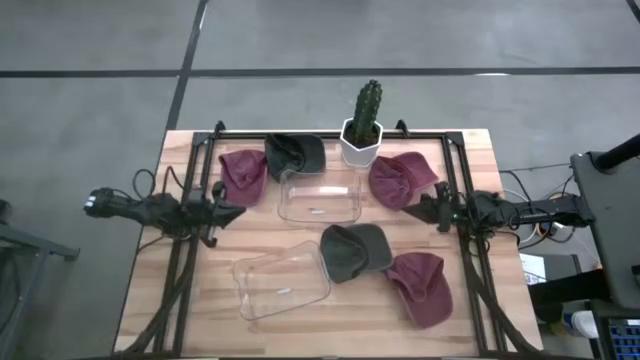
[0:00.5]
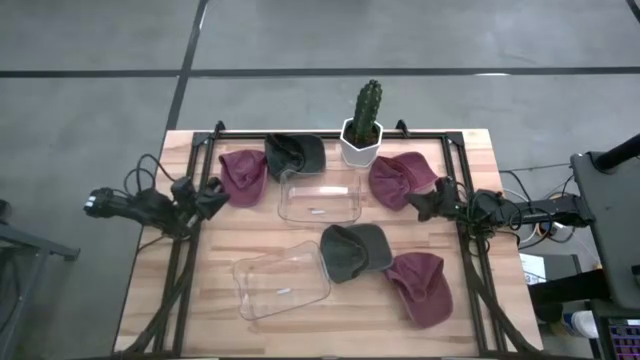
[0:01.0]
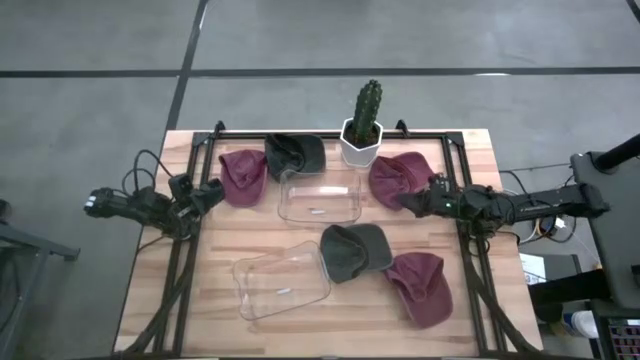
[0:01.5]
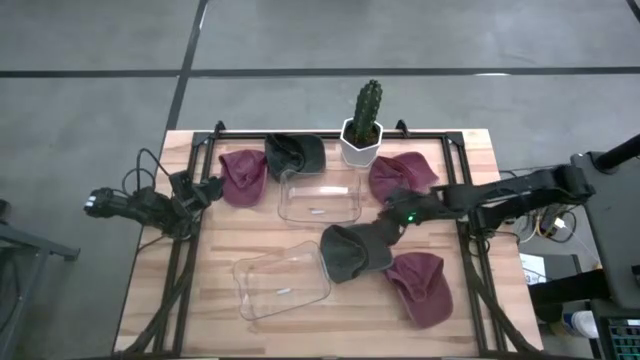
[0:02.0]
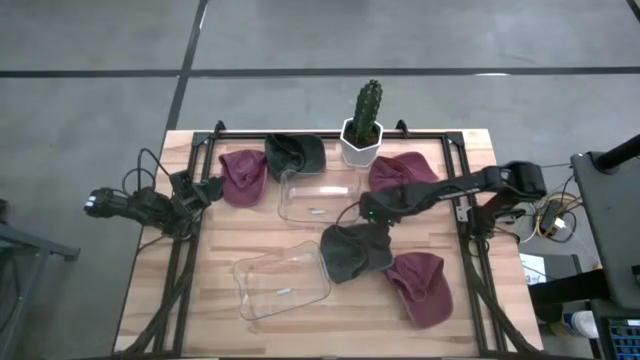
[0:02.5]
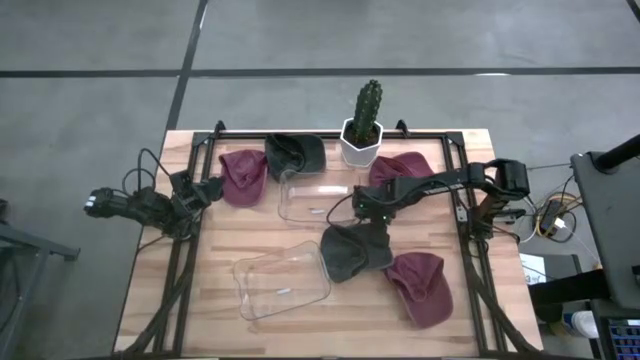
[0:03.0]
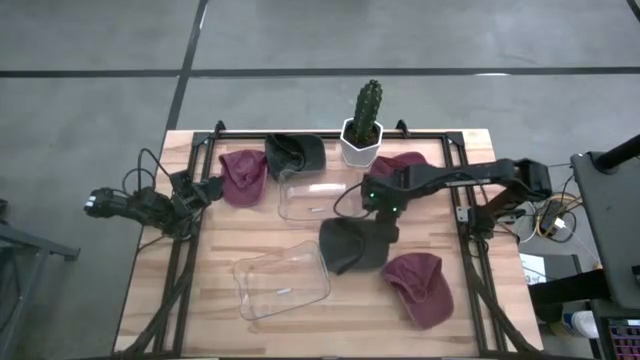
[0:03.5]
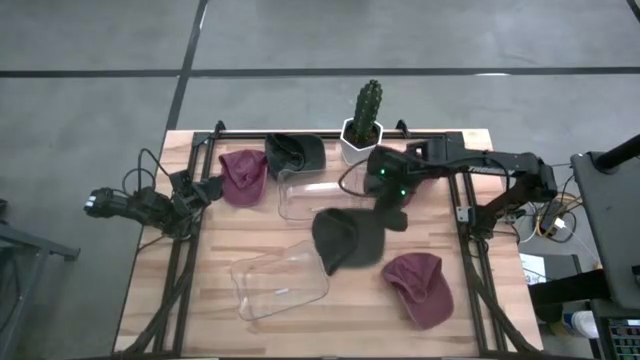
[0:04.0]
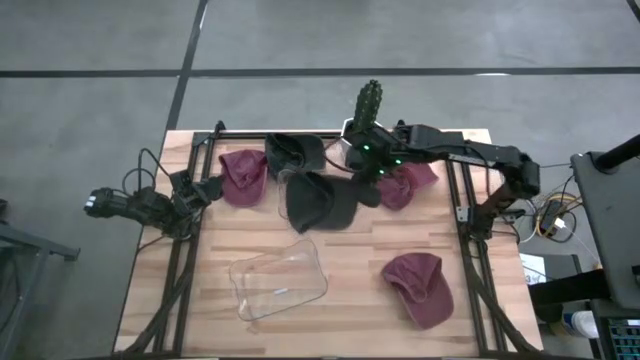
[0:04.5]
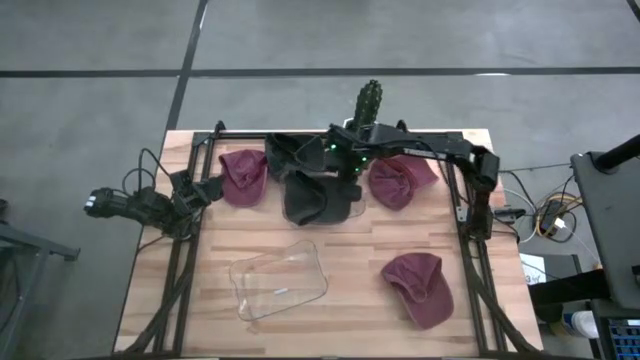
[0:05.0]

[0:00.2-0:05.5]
Task: Pick & Place hat
Put the black cap into the top transparent bin

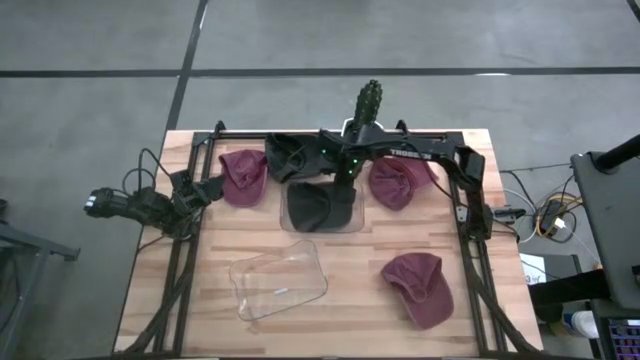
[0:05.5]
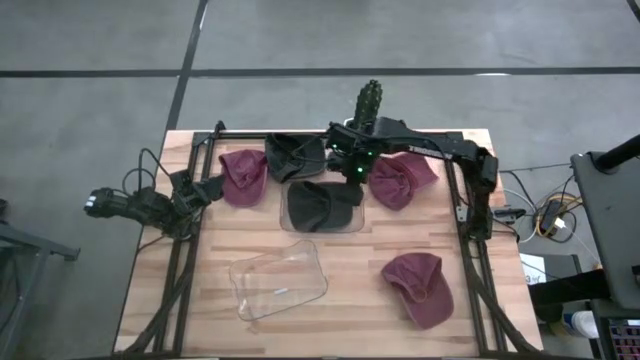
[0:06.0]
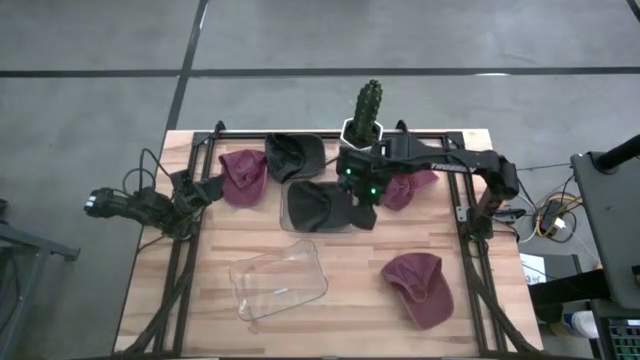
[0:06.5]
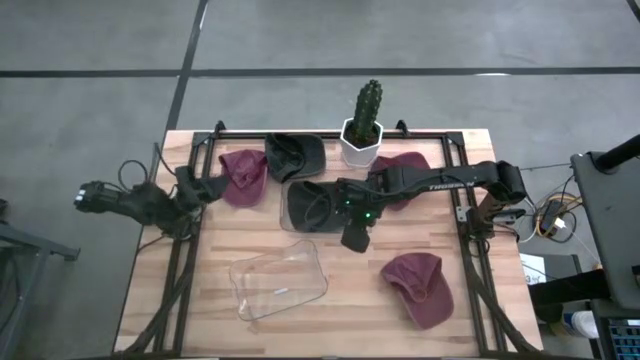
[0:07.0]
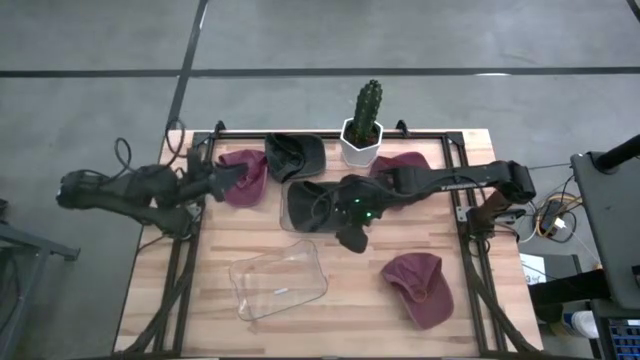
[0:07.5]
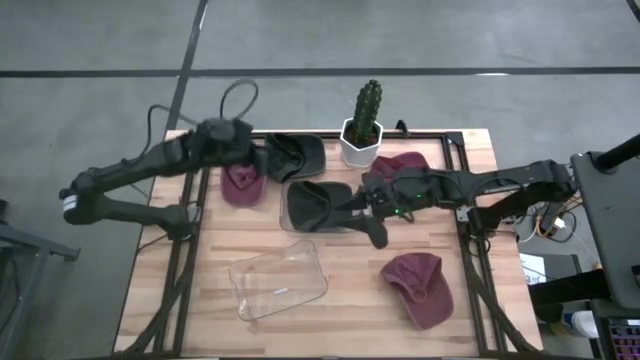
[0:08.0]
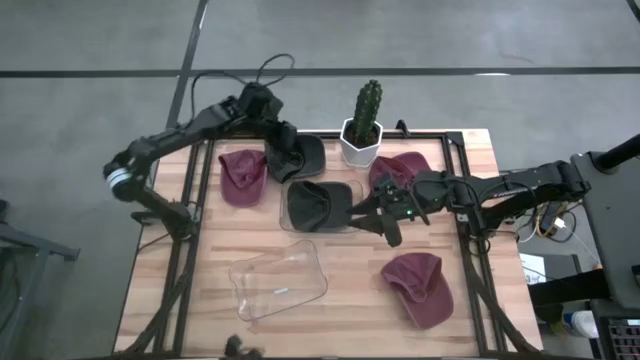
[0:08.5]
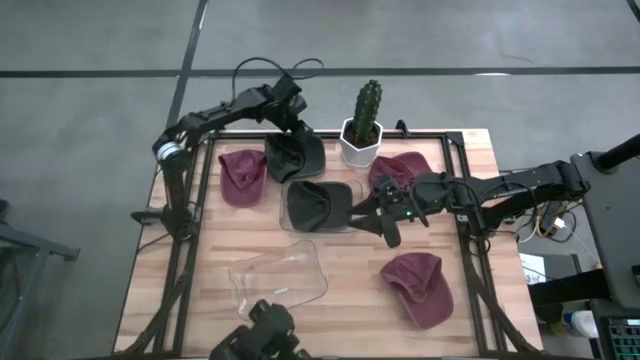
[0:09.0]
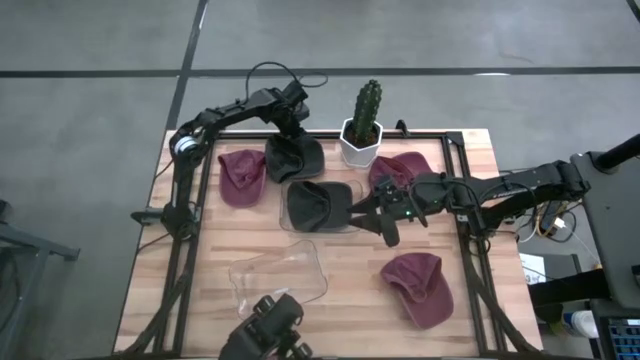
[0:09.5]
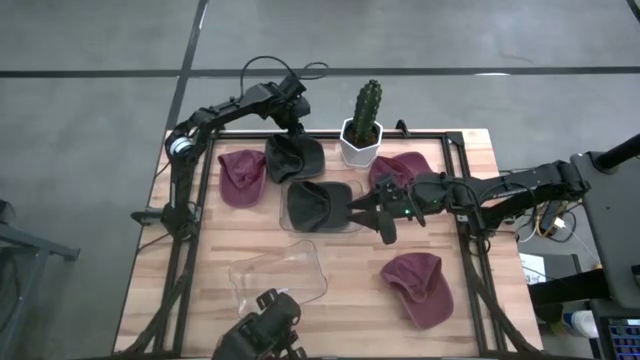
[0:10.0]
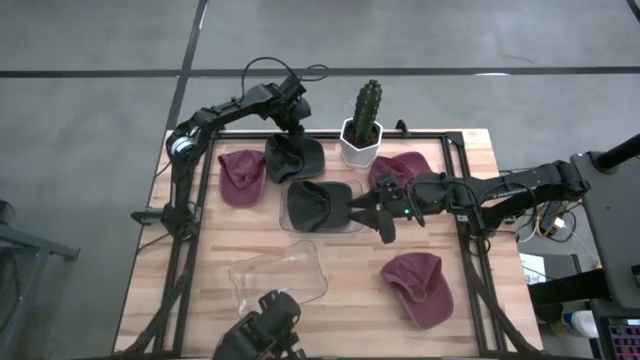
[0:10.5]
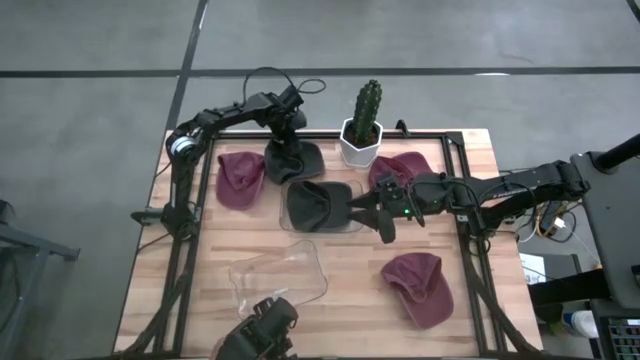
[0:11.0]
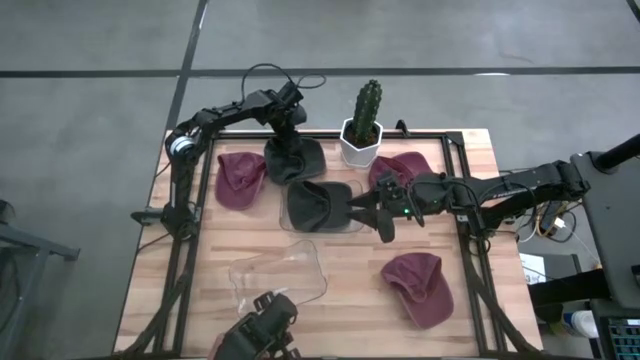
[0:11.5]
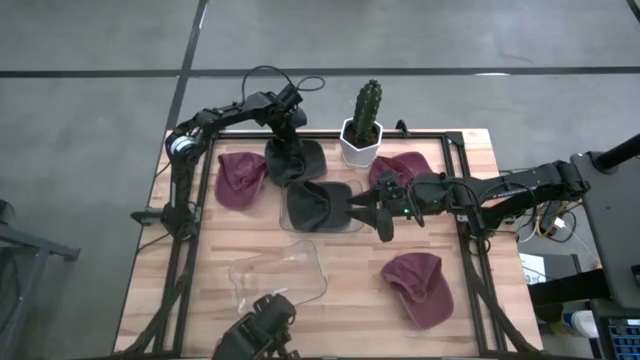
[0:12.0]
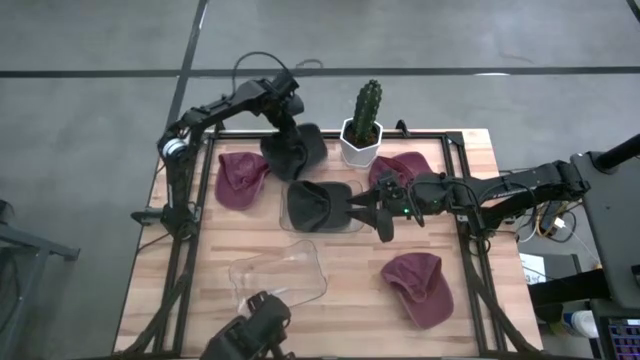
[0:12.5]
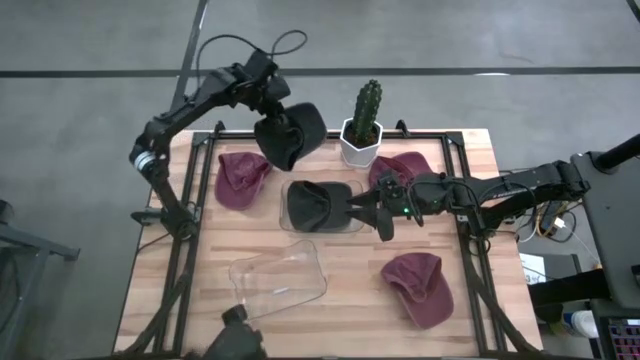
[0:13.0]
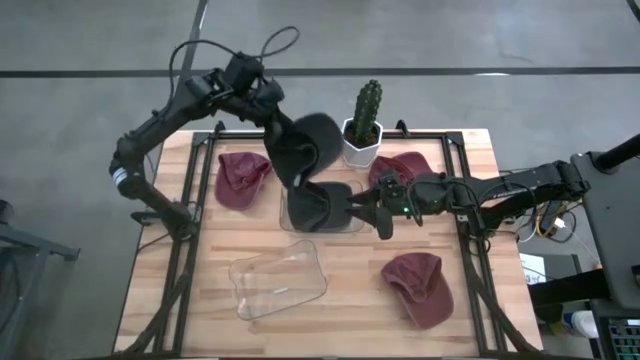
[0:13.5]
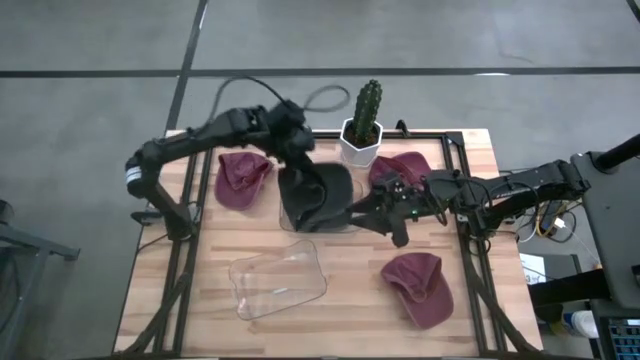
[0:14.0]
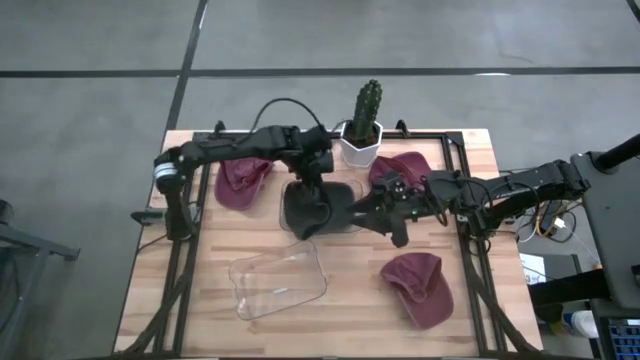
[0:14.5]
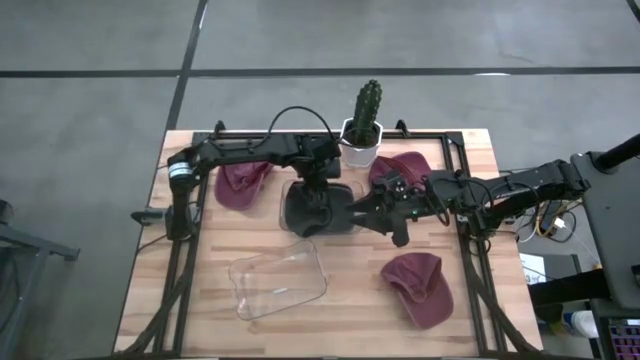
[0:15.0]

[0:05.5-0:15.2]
Put the black cap into the top transparent bin

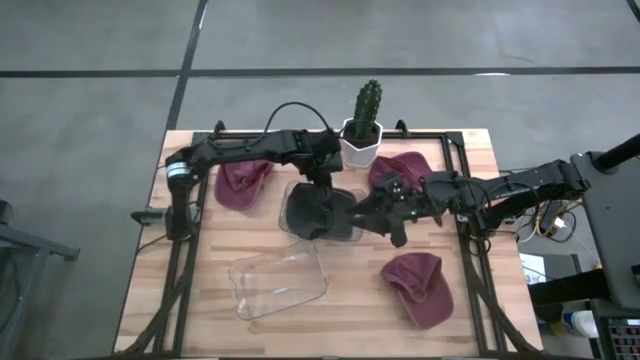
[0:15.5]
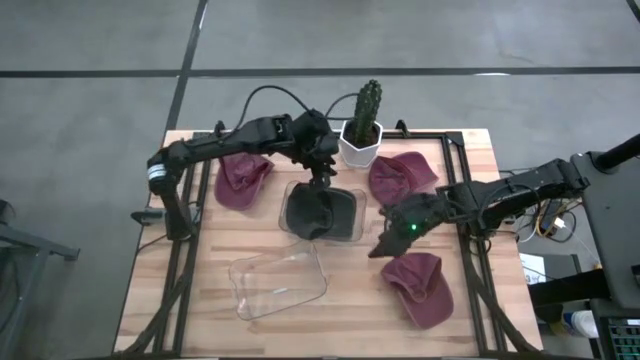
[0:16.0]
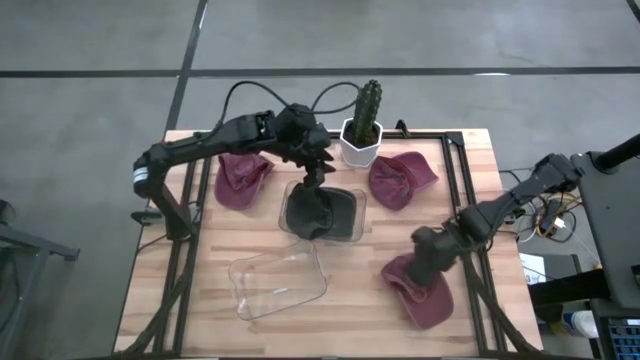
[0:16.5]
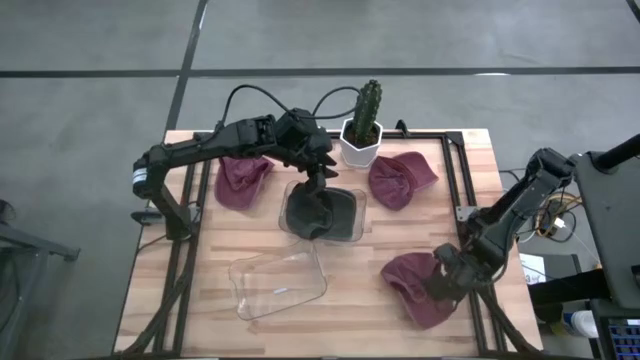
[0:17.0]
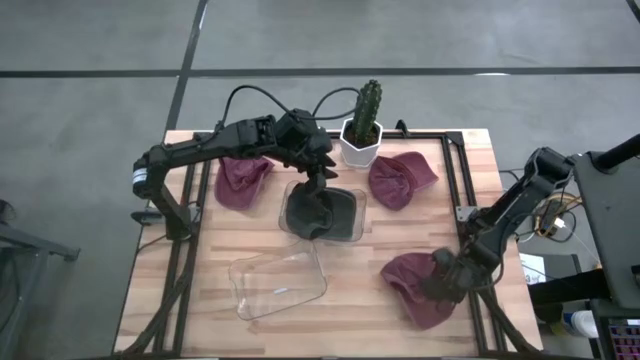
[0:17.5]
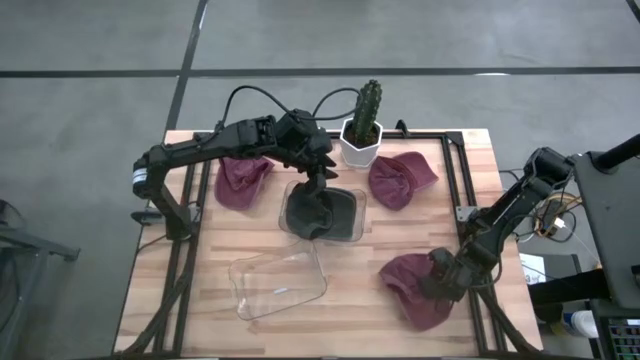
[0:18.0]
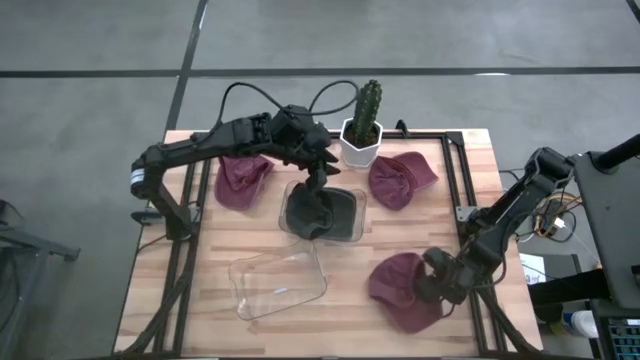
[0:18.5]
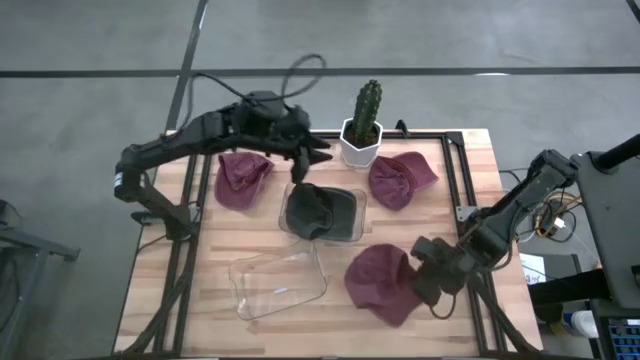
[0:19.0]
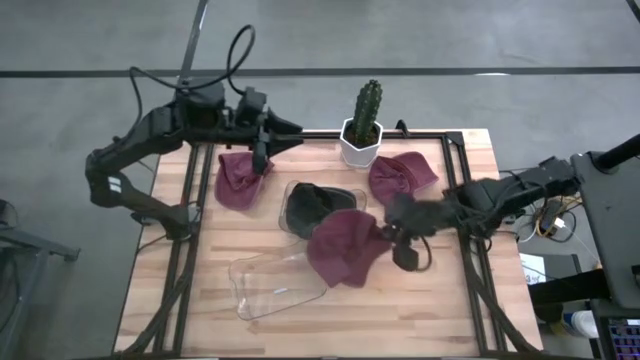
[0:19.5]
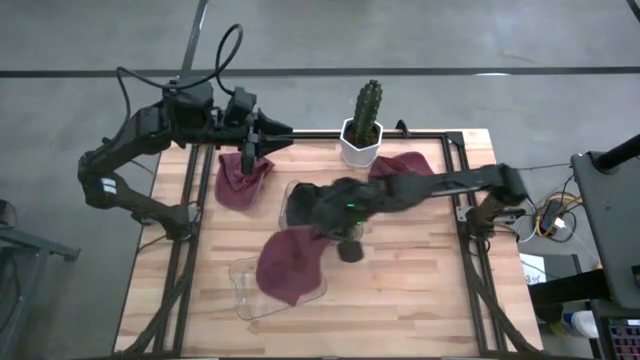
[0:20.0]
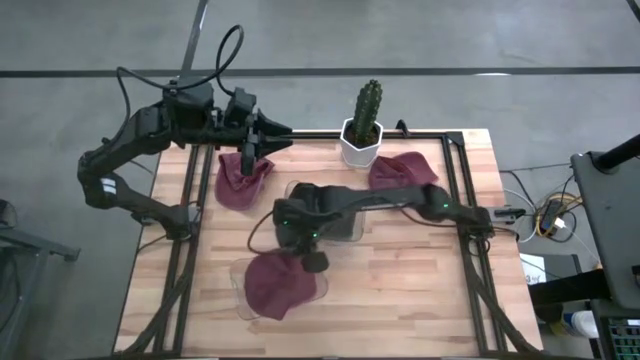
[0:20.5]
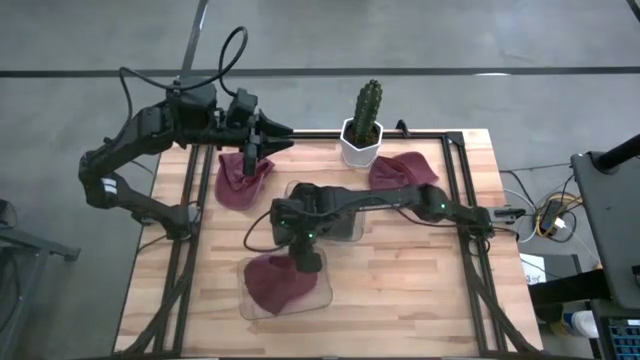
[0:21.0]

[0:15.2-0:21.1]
Put the red cap into the bottom transparent bin
